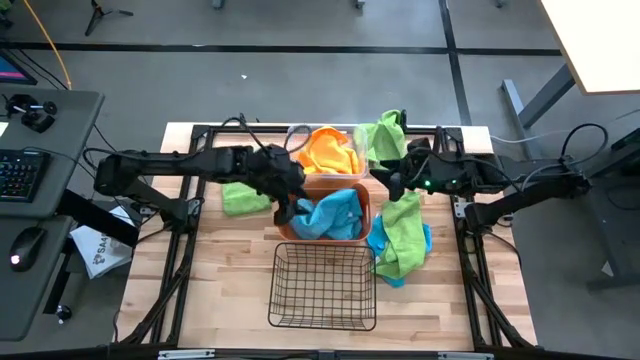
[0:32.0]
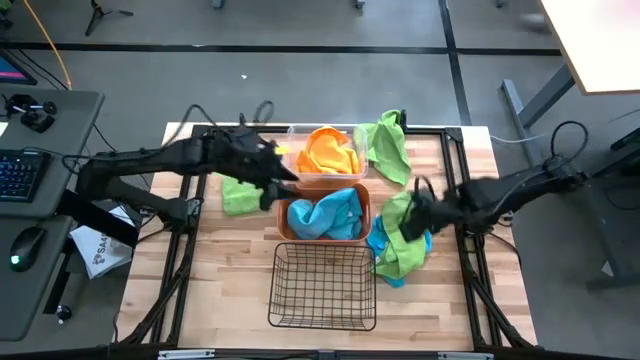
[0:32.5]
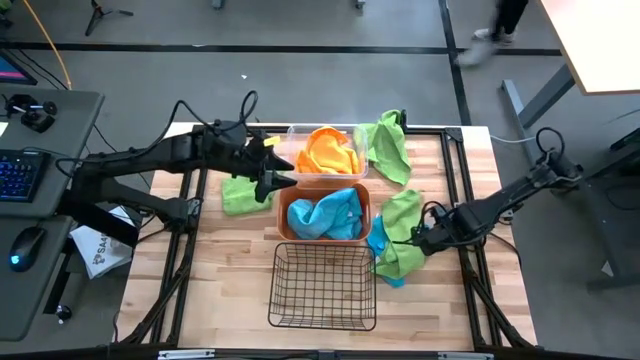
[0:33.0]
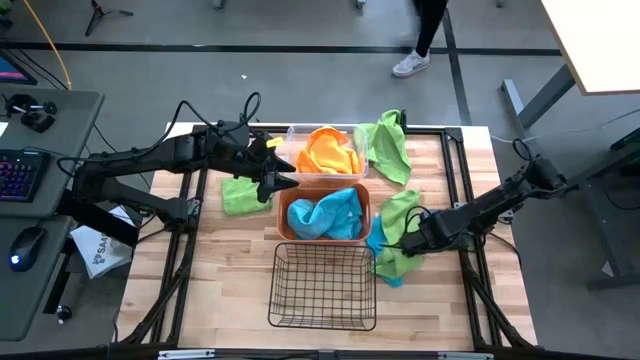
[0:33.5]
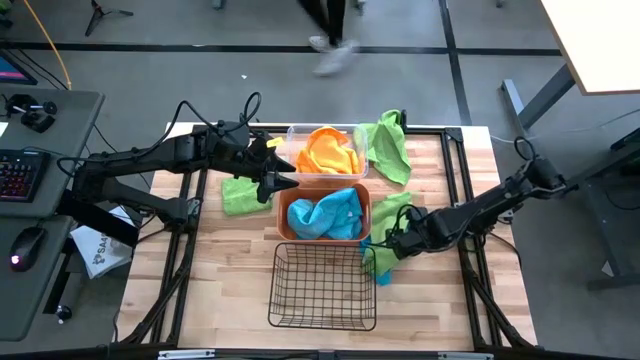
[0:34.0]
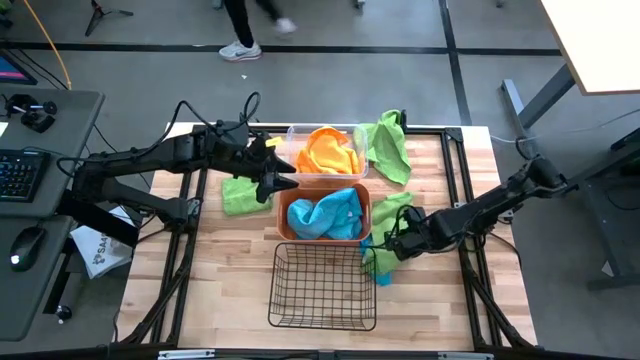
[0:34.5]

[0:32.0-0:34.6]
Task: Sort microfiber towel by color & place in baskets
Put the blue towel into the orange bin

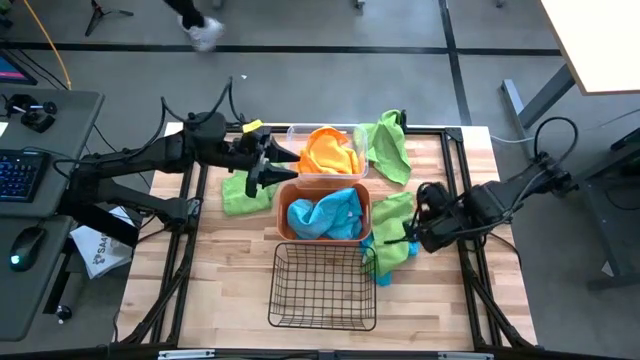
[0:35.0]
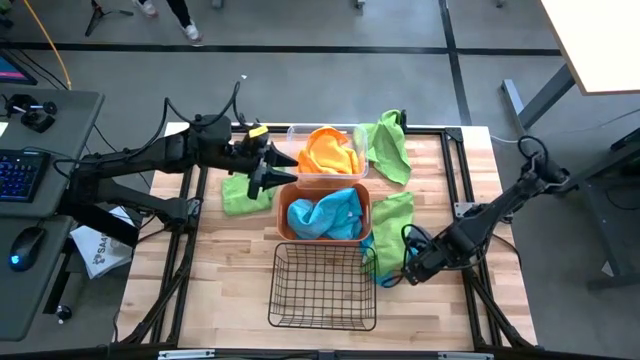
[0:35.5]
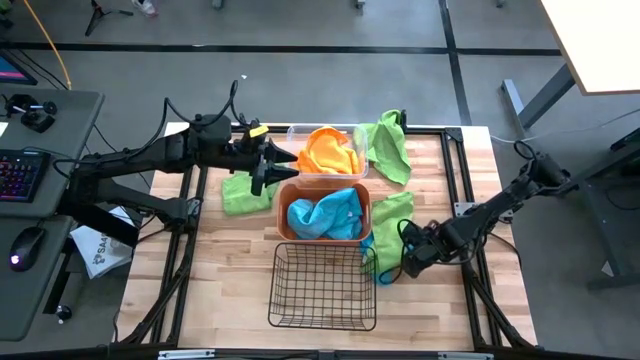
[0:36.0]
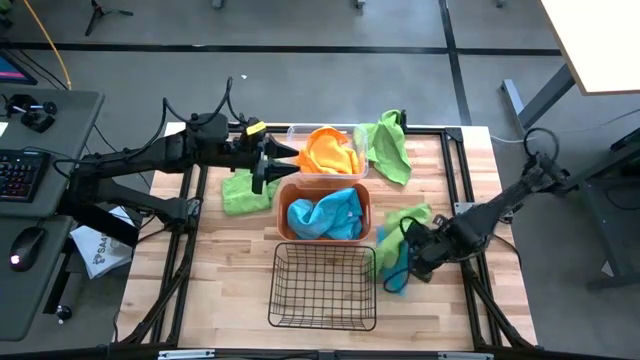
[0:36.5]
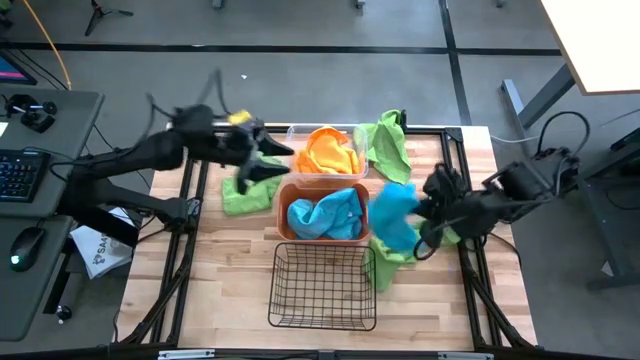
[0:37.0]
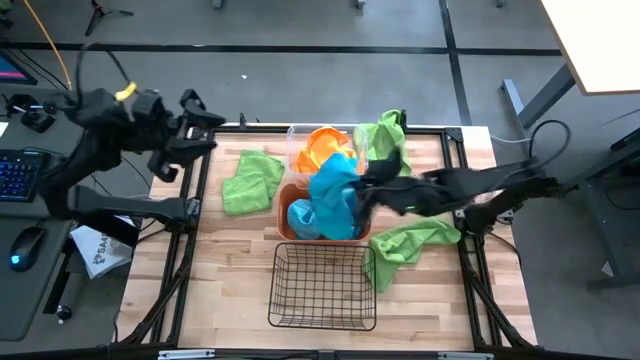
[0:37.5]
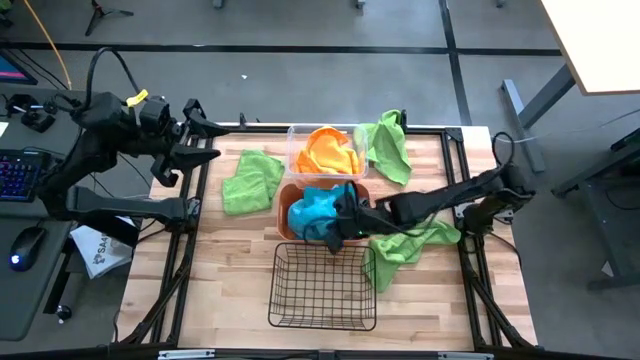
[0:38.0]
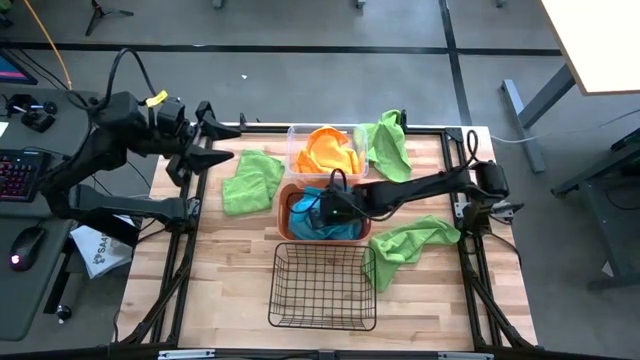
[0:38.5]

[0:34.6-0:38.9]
Put the blue towel into the orange bin

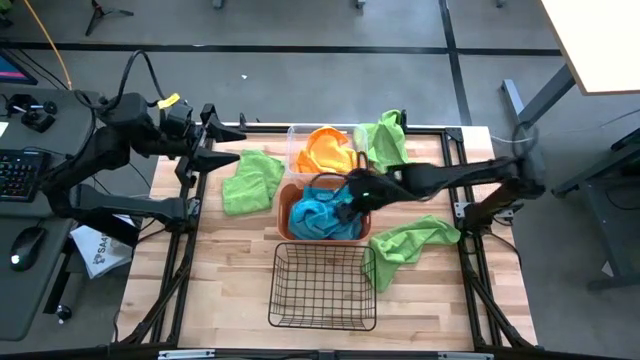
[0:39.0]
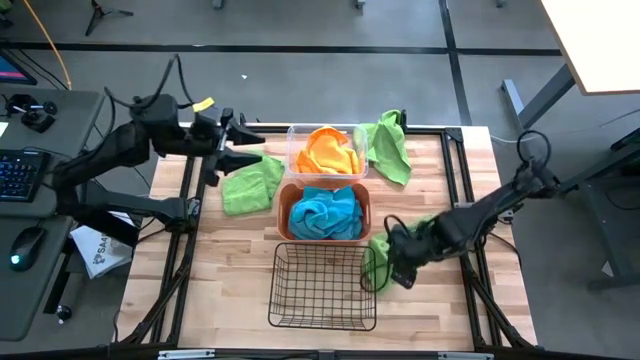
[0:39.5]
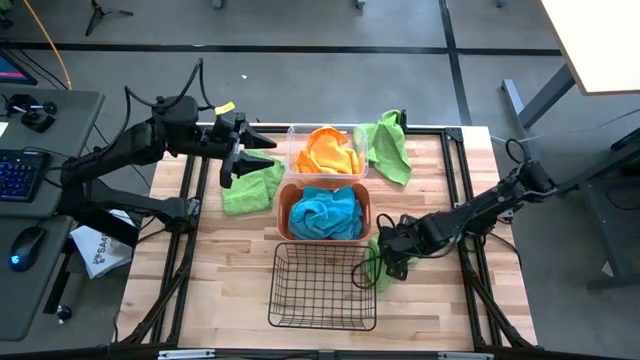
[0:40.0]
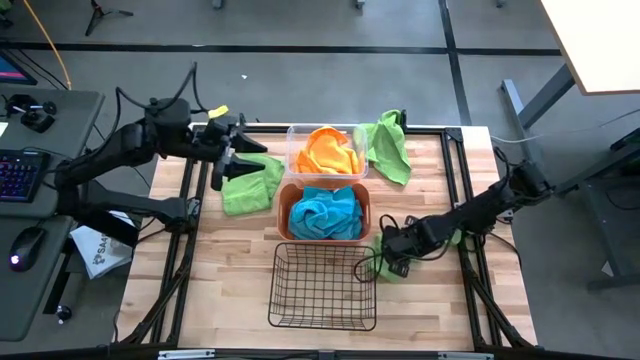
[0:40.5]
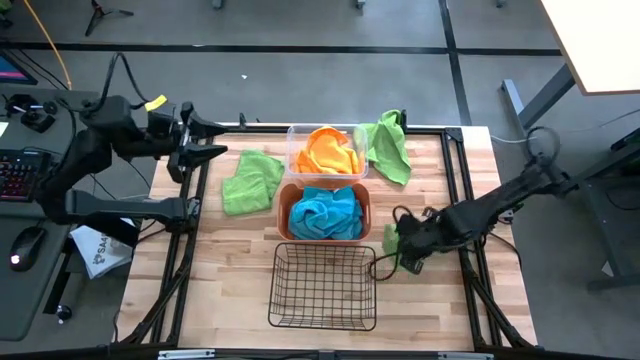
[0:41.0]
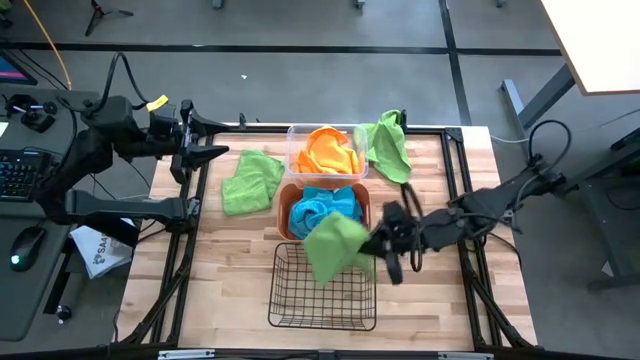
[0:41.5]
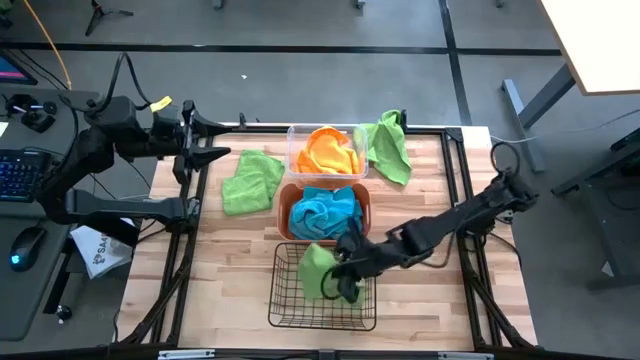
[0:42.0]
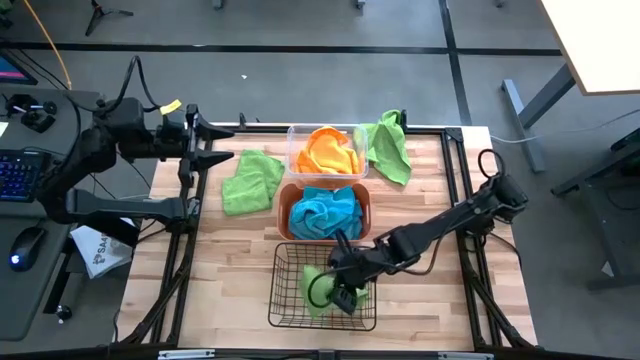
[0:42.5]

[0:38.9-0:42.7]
Put the bottom green towel into the black wire basket

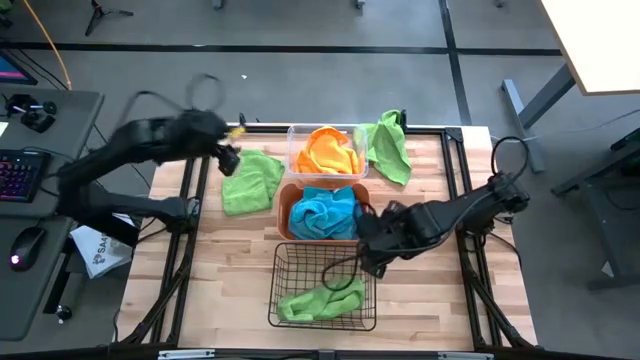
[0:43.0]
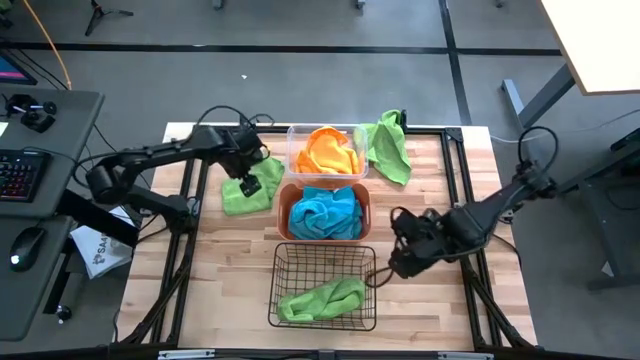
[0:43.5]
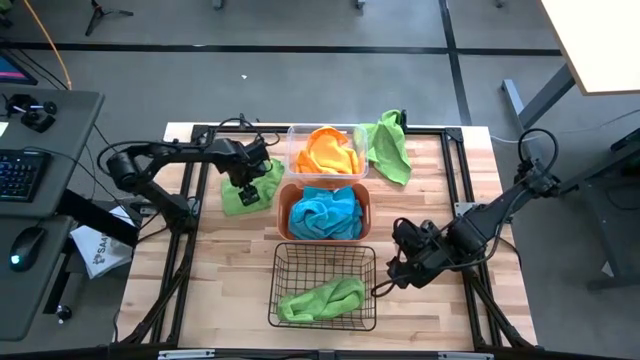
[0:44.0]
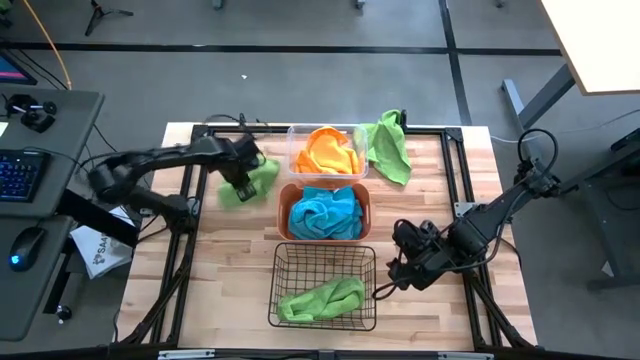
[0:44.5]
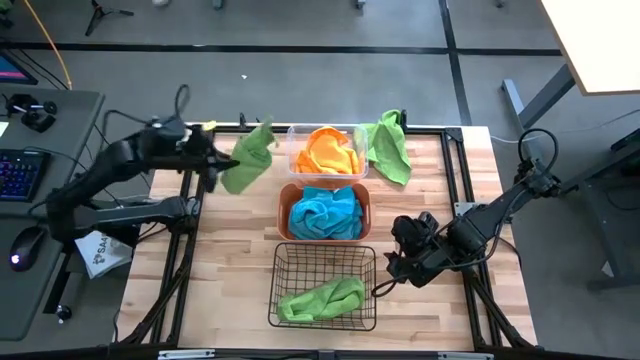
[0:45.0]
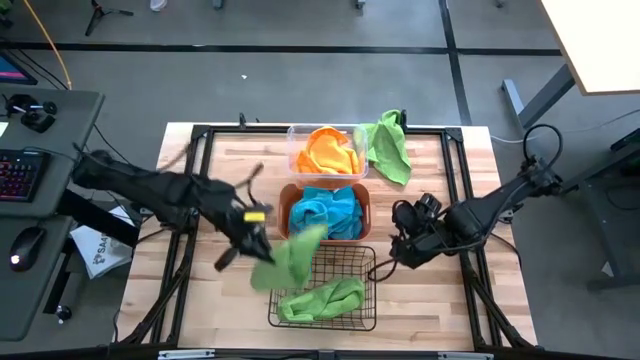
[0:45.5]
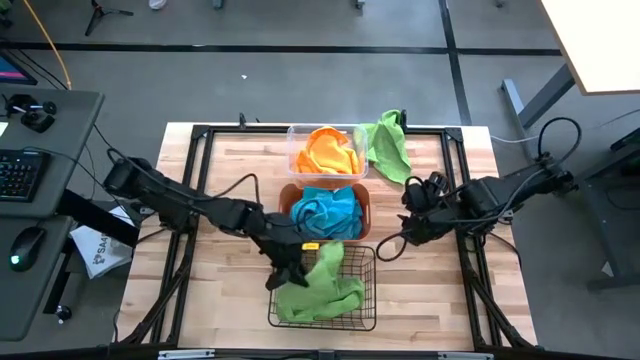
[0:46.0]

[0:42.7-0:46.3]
Put the left green towel into the black wire basket

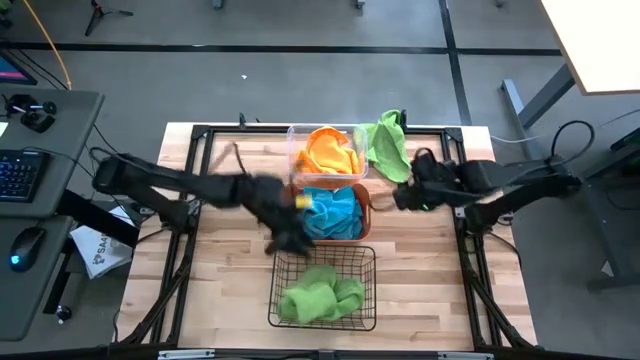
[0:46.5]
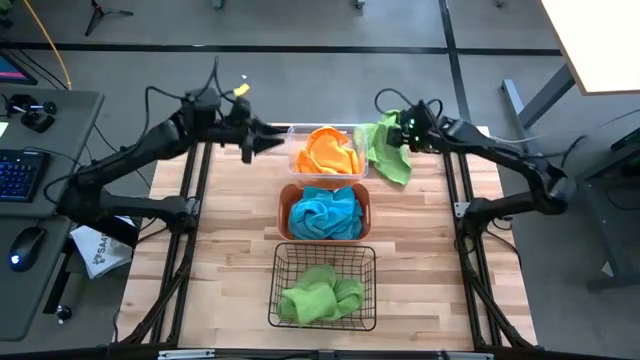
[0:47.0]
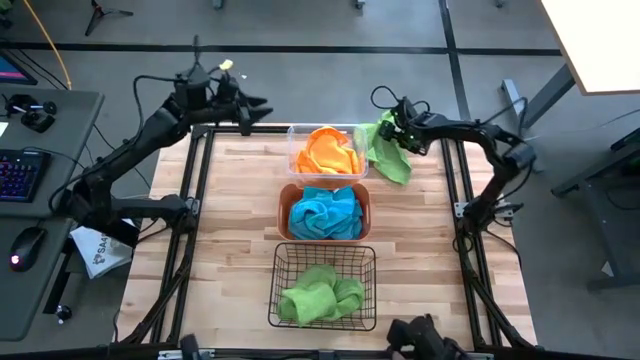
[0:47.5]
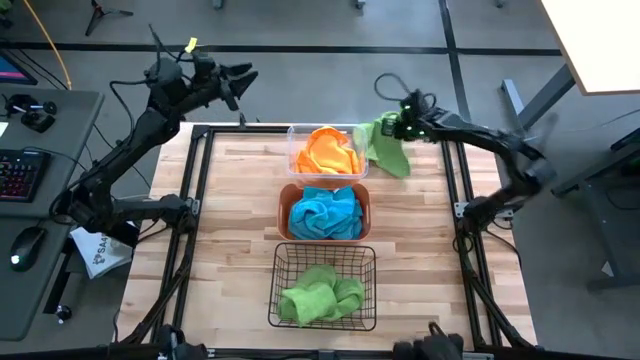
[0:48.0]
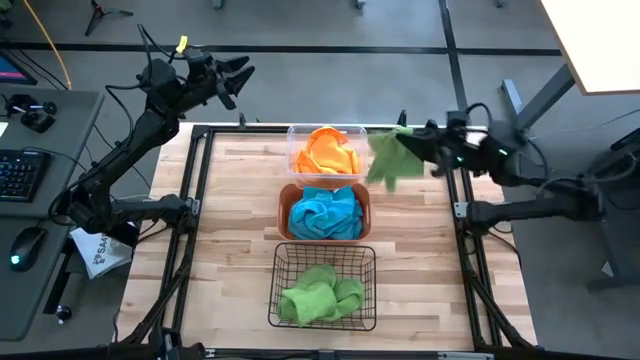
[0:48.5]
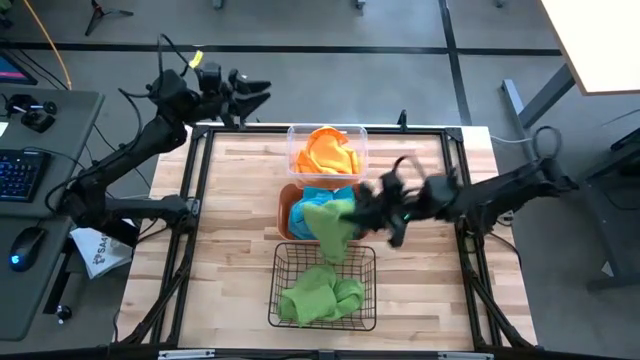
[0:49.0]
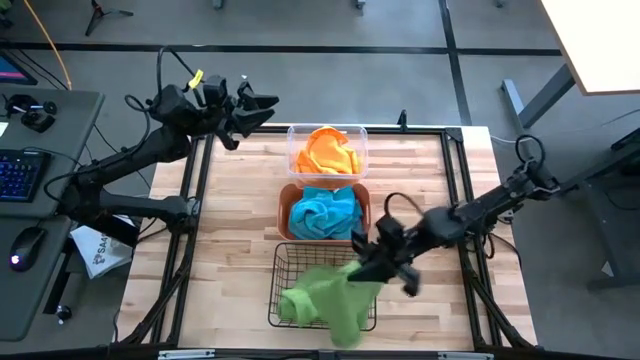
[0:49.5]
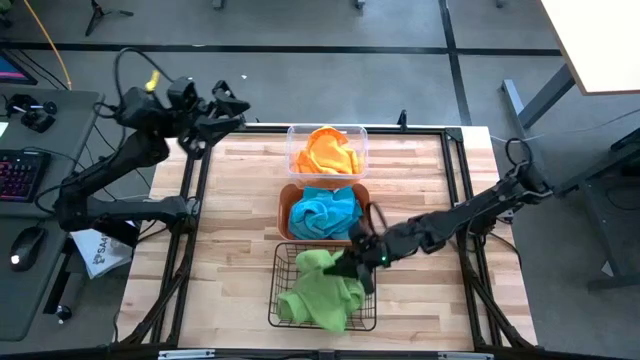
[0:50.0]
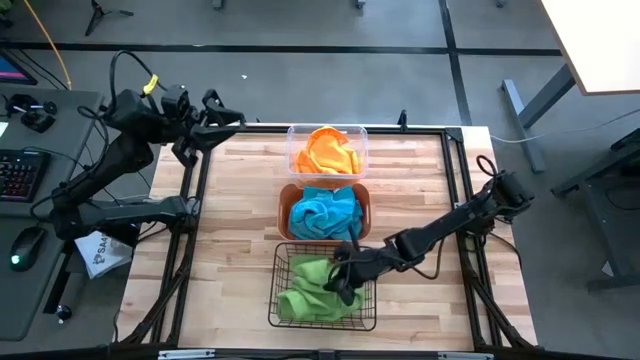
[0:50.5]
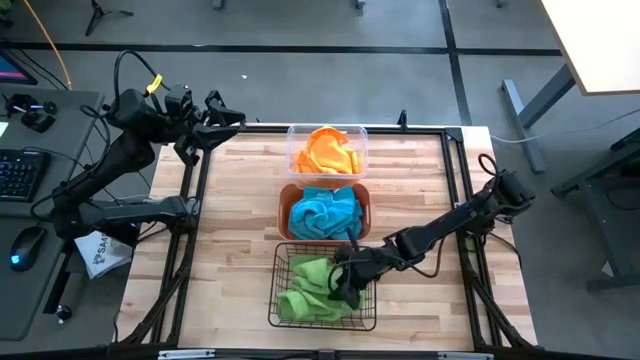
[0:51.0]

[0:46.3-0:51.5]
Put the green towel into the black wire basket

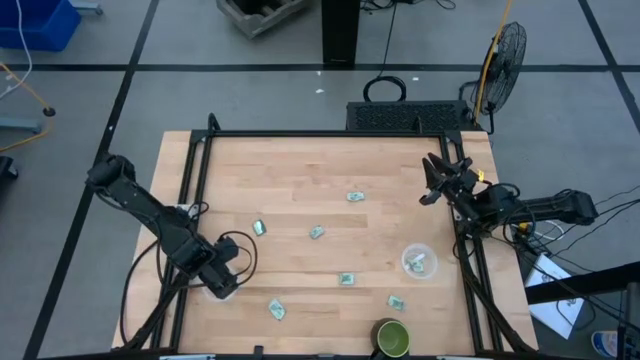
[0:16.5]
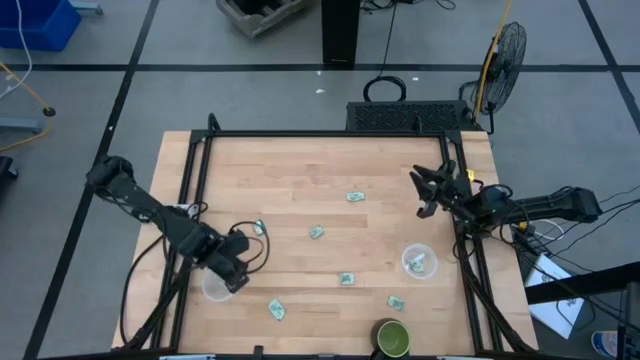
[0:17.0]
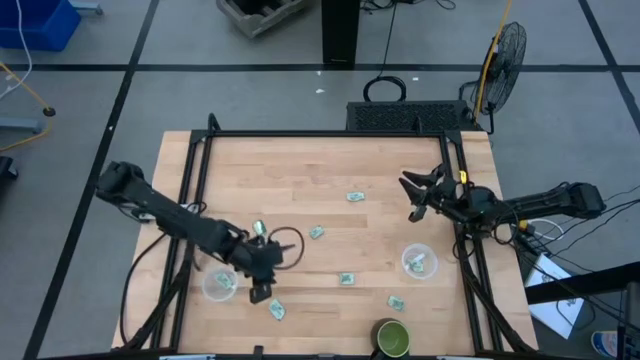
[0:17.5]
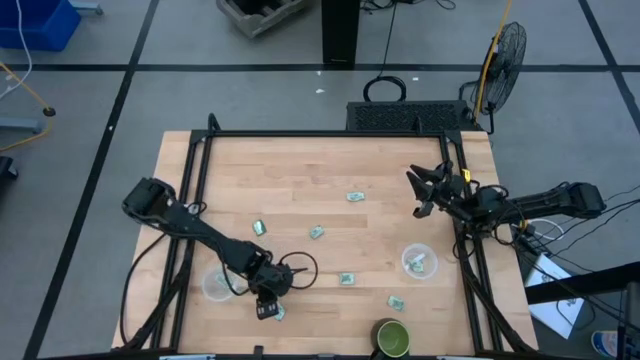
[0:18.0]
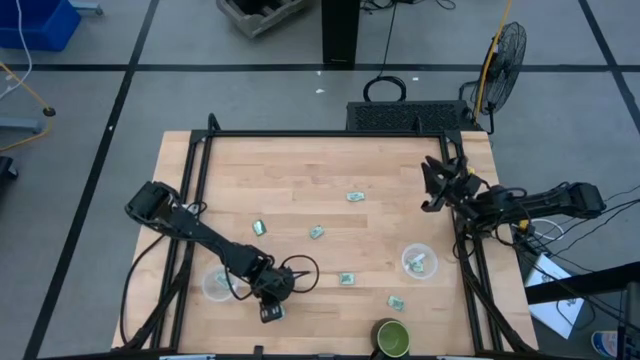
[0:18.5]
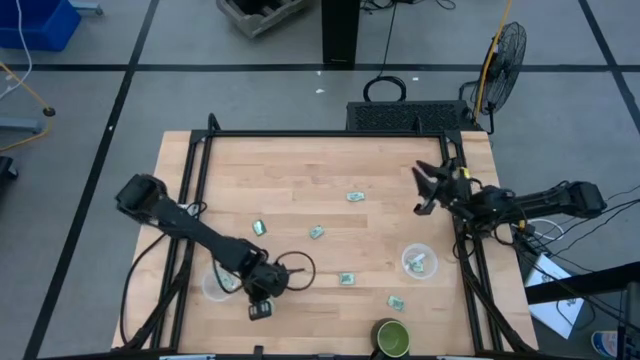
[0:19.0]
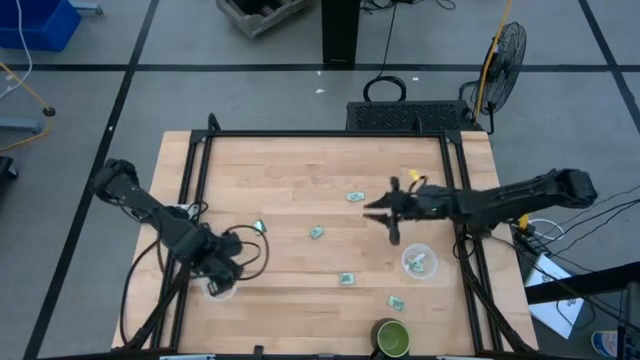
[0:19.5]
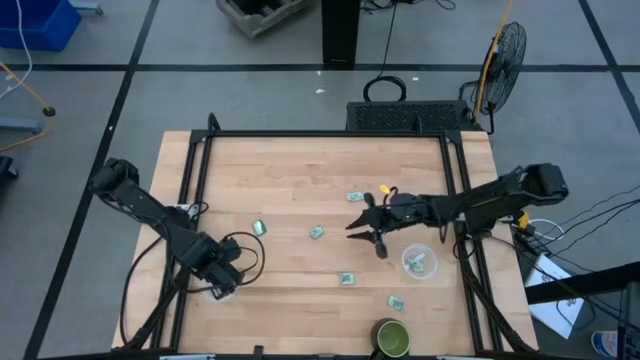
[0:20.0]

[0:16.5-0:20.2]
Task: Pick and place Stevia / Truvia into bins
Put the Stevia packet into the left transparent plastic container
